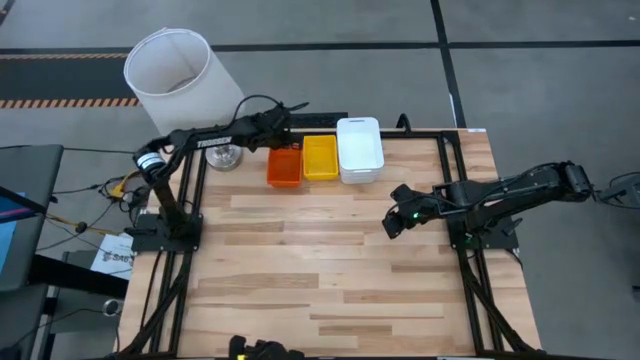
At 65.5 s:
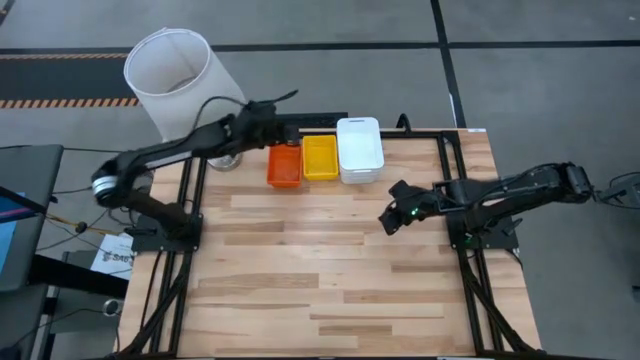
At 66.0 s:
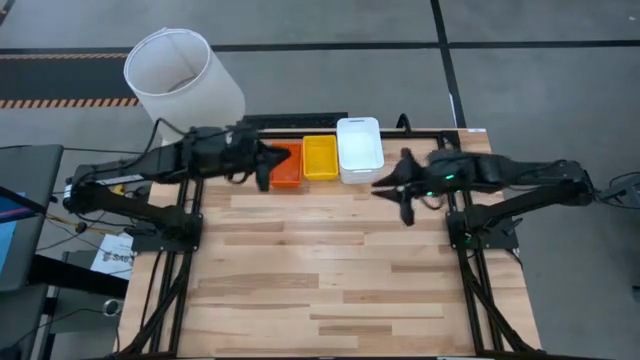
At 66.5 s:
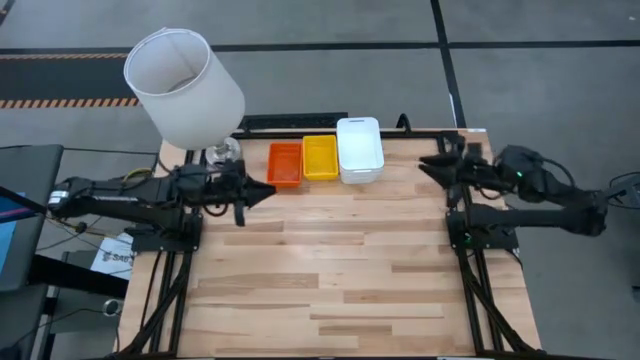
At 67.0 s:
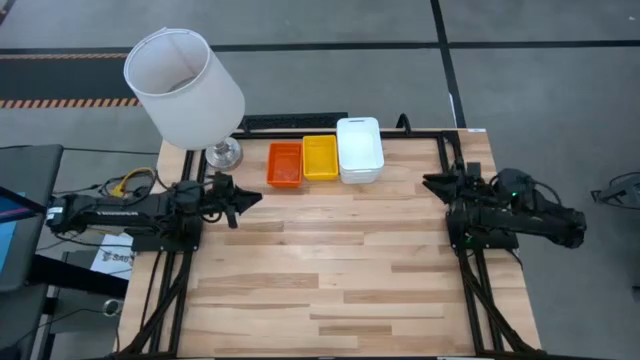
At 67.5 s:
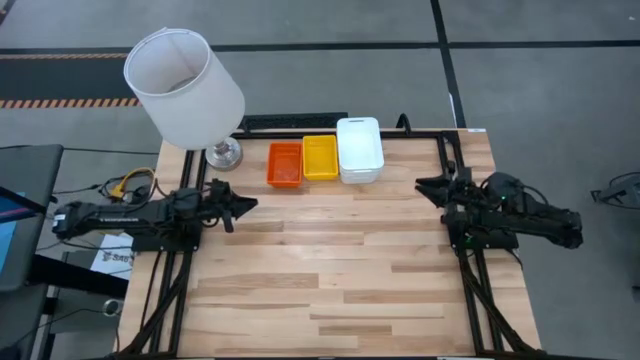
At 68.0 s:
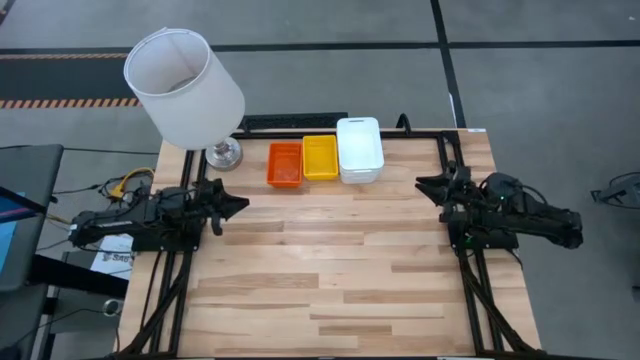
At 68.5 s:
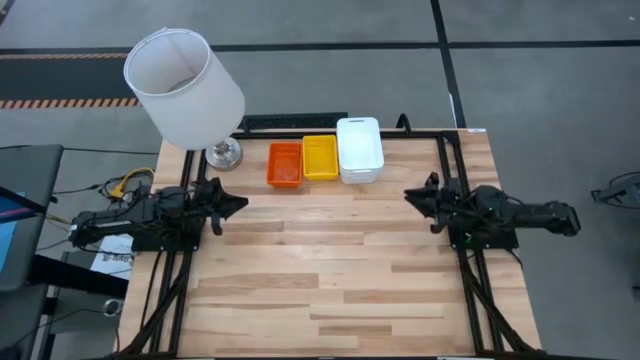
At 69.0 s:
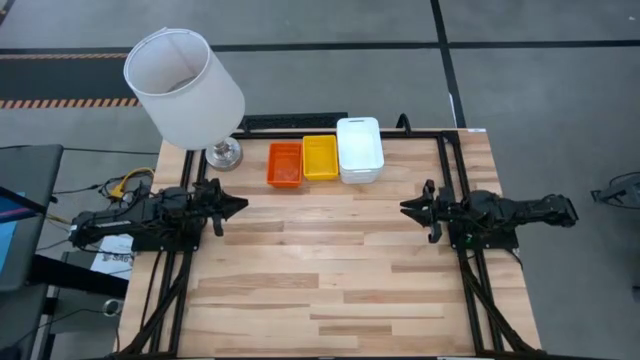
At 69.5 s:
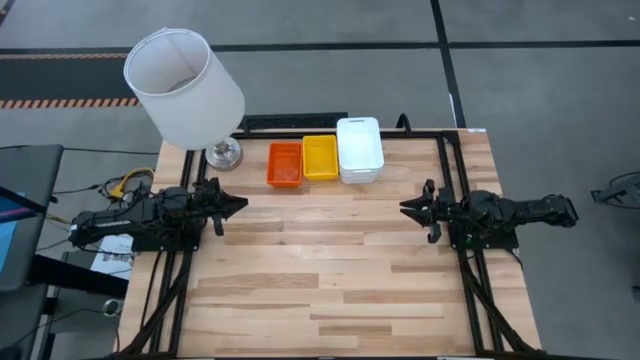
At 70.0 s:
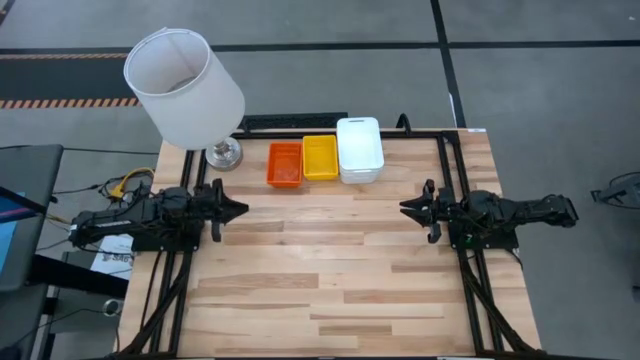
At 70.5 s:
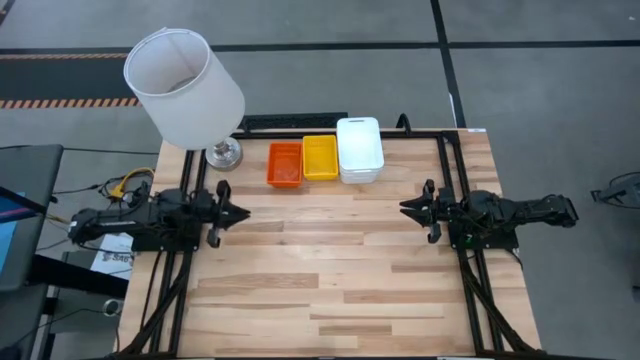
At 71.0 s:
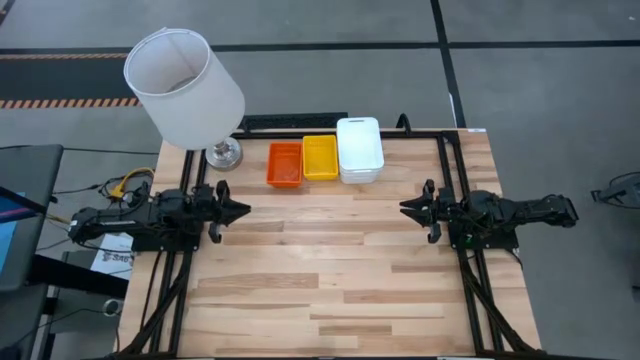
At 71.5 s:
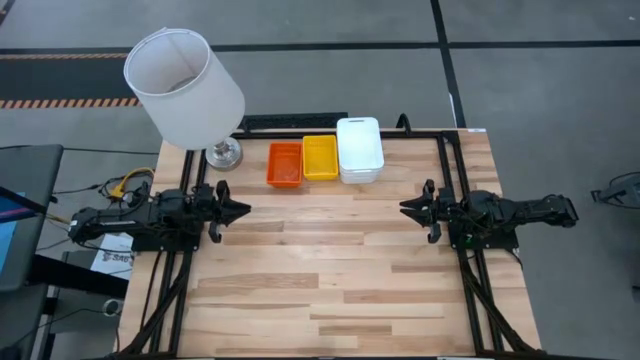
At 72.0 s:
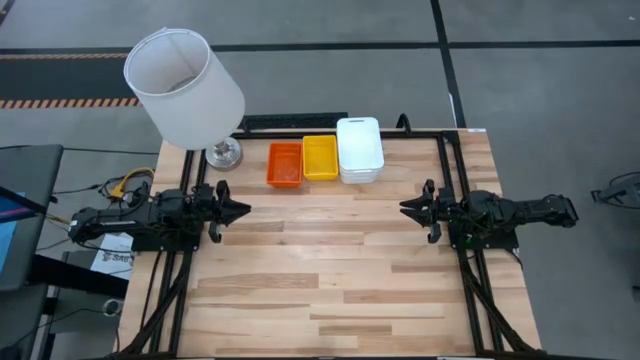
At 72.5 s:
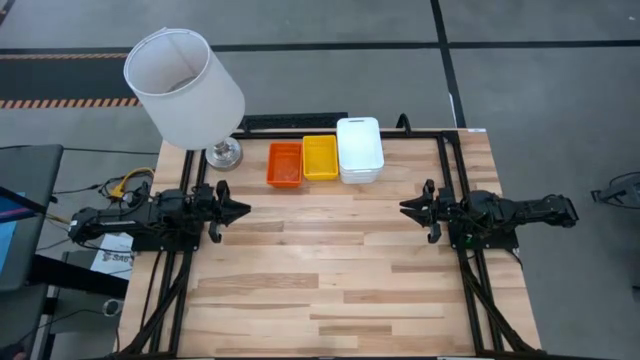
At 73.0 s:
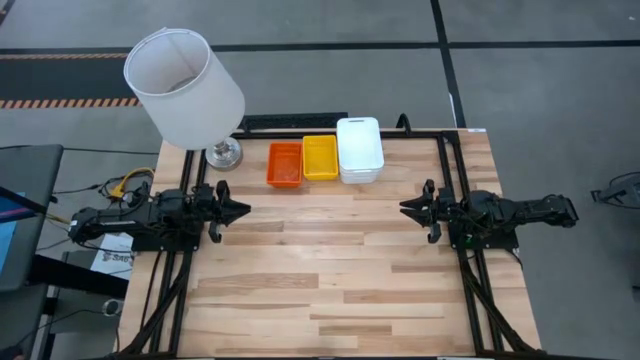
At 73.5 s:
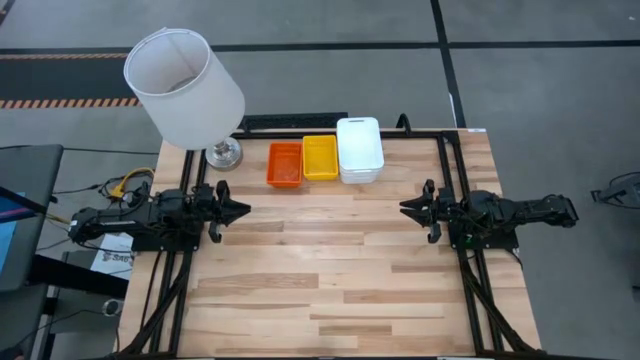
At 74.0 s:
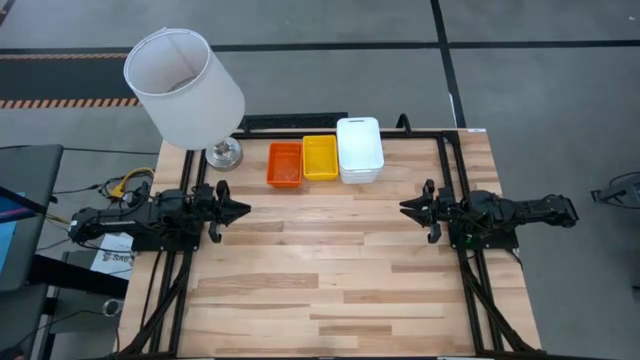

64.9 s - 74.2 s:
Return to Home Position

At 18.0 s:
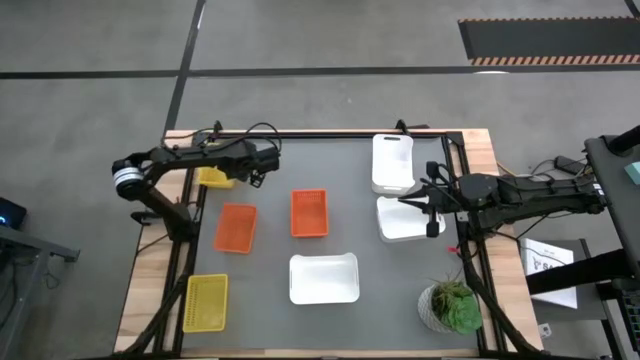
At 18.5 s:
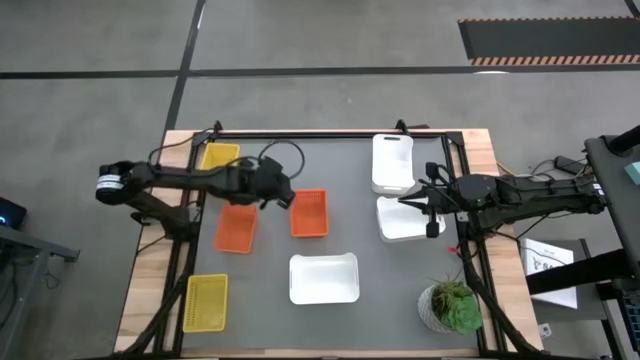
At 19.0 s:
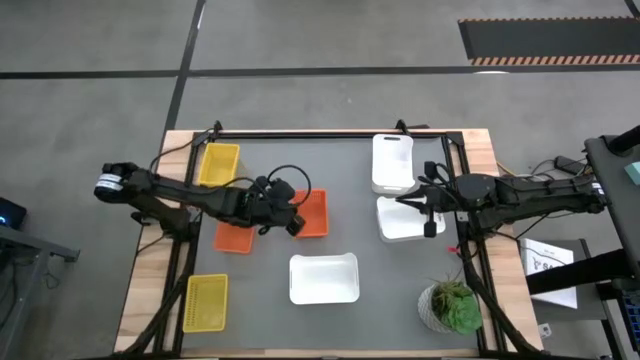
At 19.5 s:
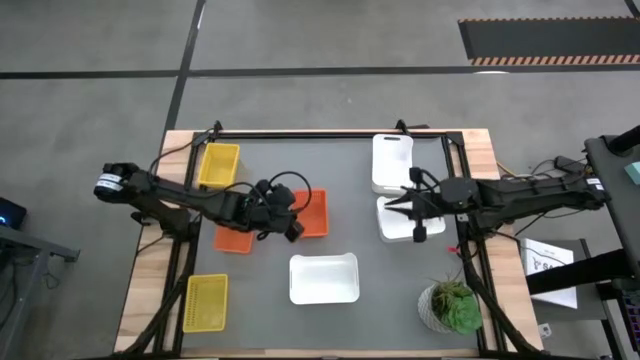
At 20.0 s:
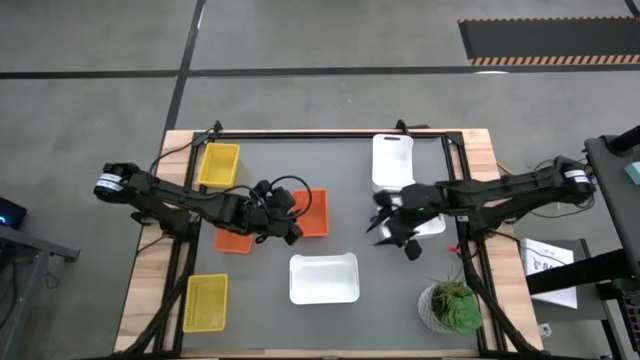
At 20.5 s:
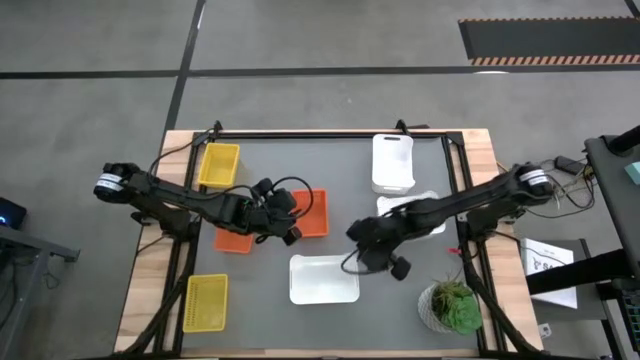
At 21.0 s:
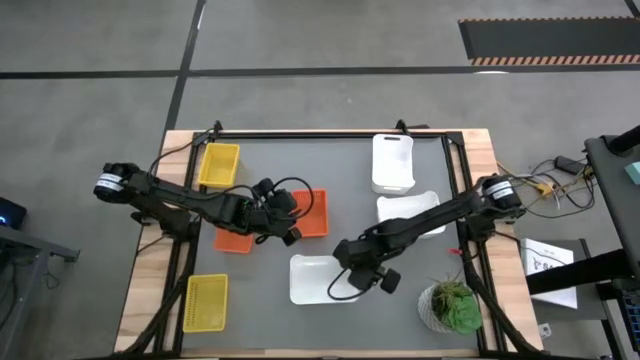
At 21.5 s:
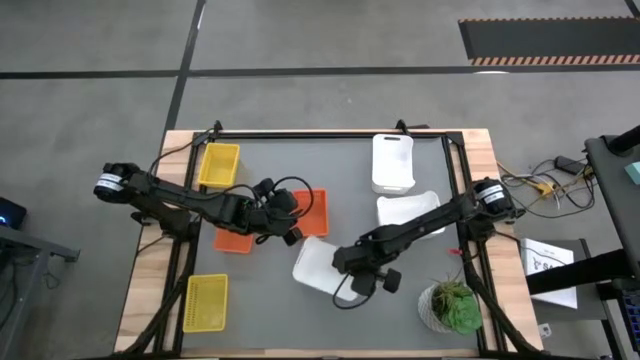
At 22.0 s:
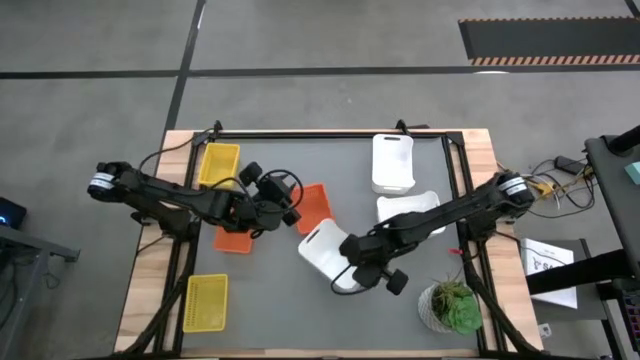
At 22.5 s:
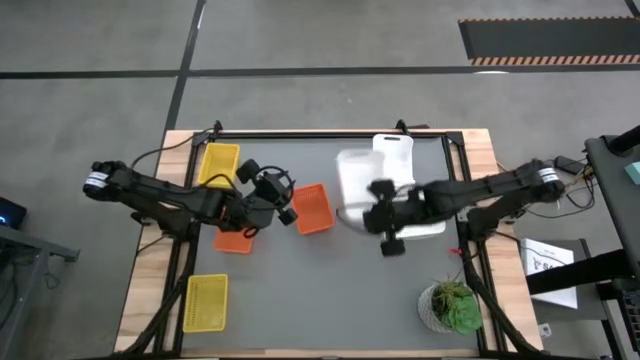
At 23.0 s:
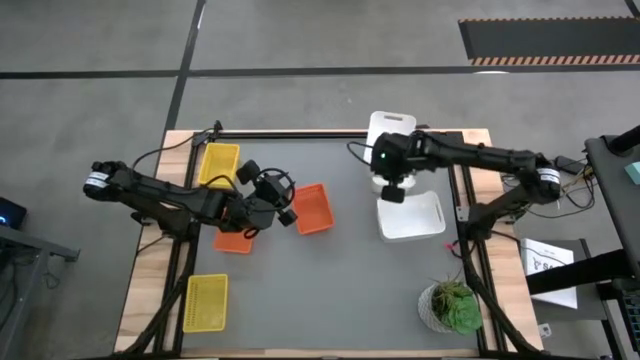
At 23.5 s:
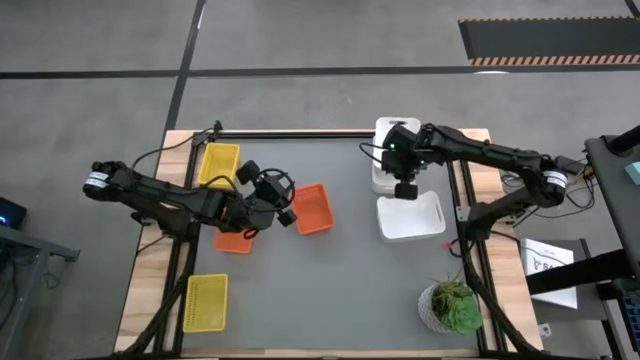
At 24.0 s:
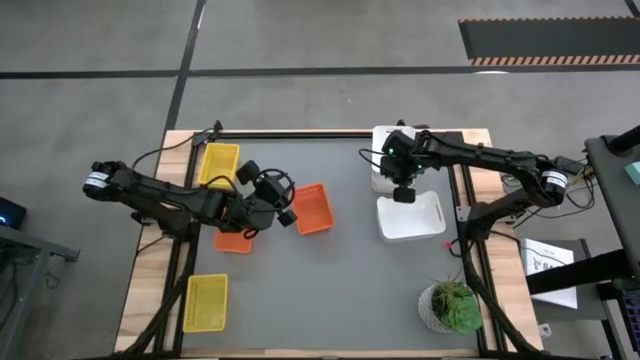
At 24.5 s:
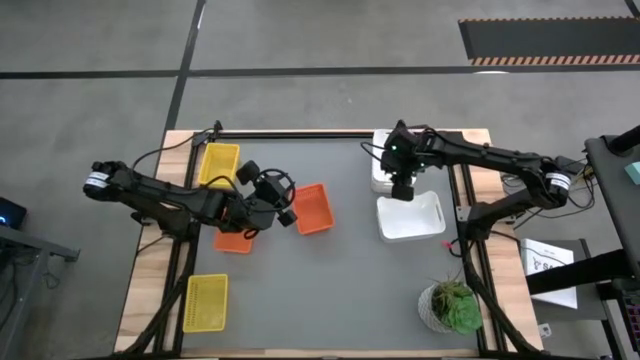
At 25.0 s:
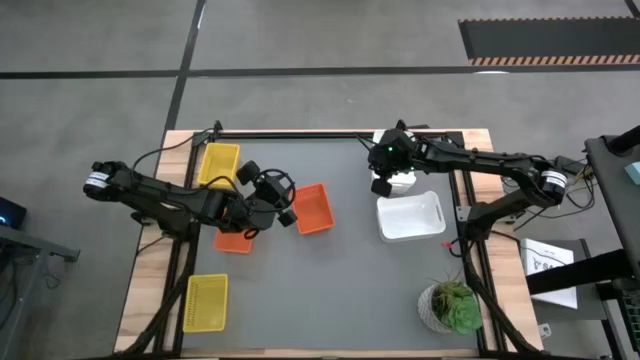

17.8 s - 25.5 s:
Stack the bottom white bin on top of the top white bin

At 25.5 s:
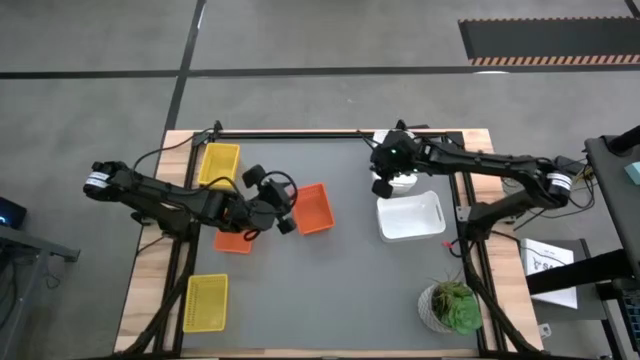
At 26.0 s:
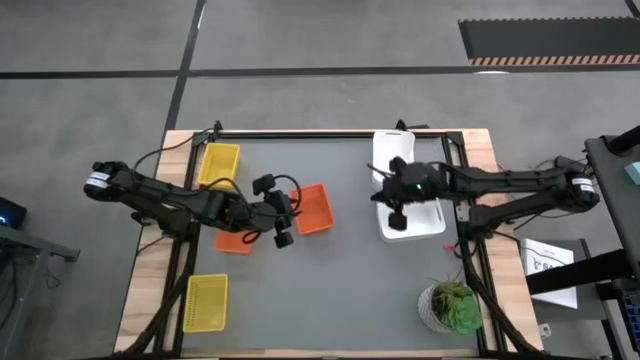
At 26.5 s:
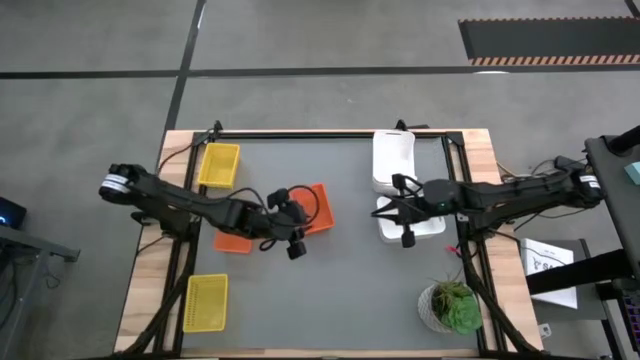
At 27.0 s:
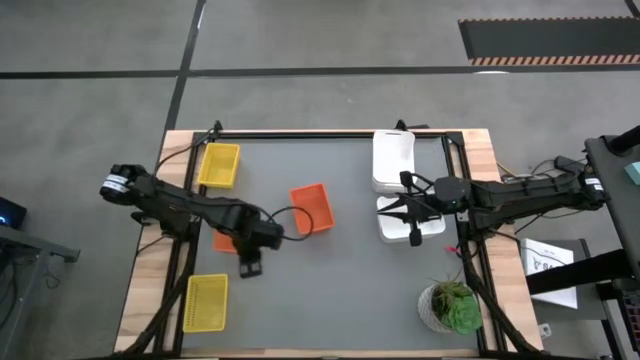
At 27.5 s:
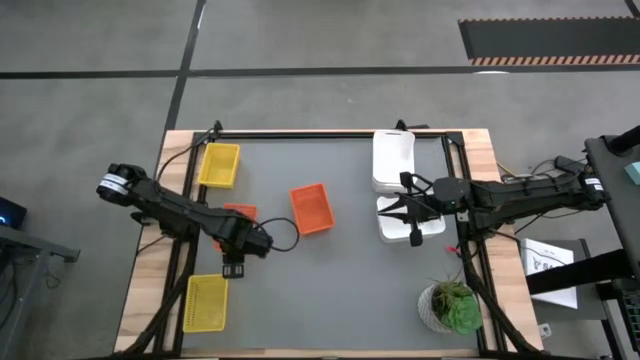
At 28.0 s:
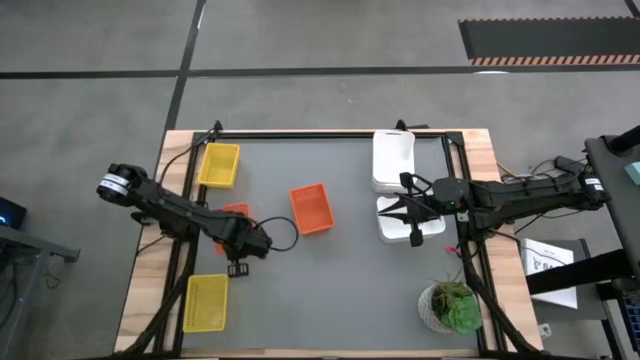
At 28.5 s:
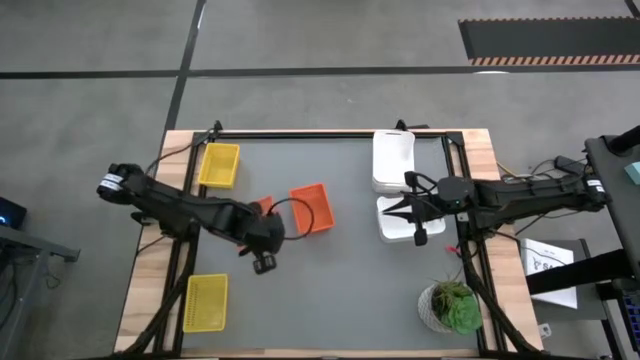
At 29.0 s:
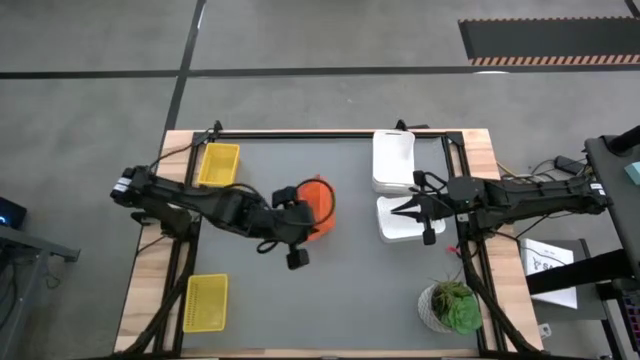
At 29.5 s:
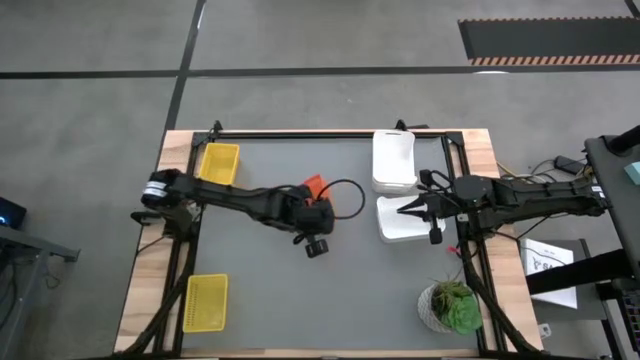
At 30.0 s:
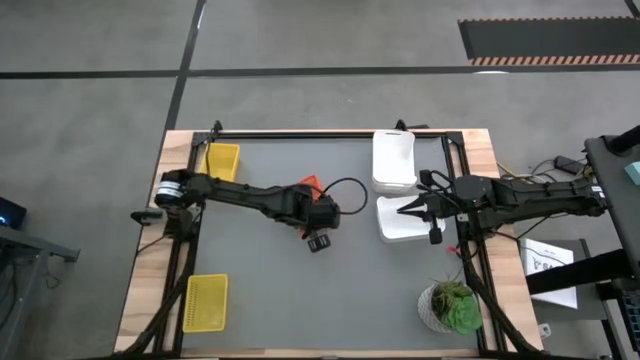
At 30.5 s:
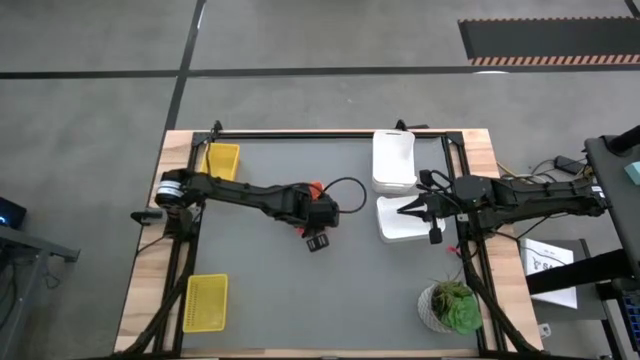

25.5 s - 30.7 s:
Stack the left orange bin on top of the right orange bin
